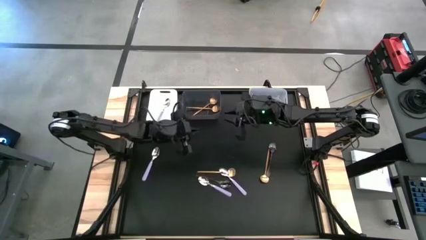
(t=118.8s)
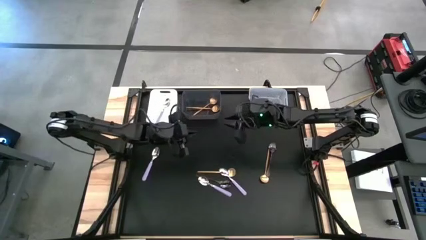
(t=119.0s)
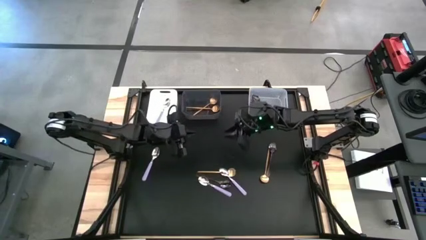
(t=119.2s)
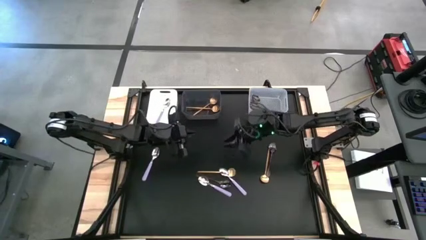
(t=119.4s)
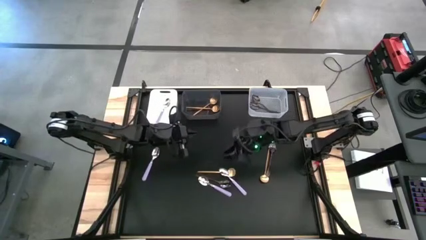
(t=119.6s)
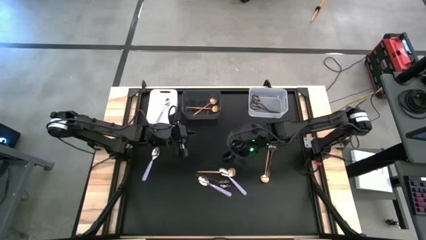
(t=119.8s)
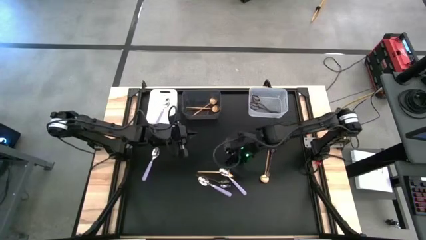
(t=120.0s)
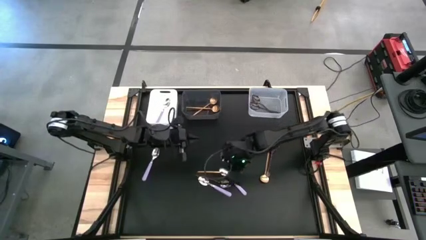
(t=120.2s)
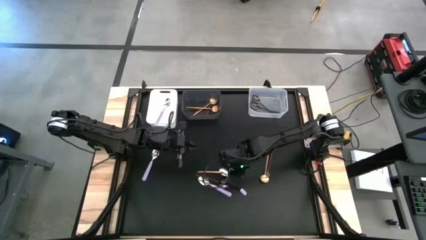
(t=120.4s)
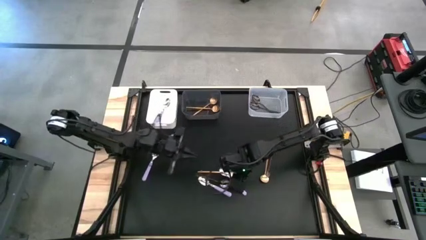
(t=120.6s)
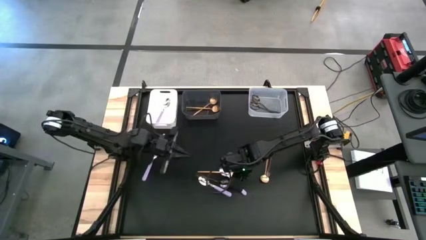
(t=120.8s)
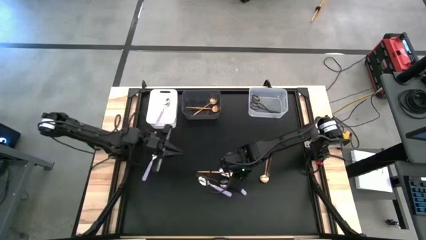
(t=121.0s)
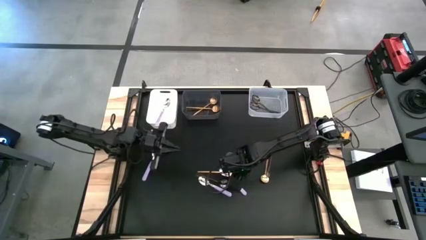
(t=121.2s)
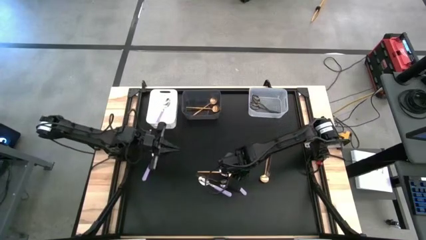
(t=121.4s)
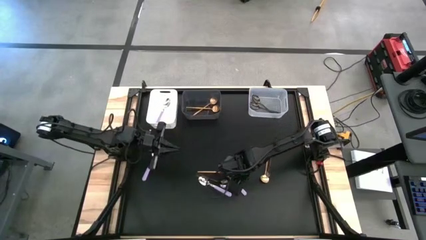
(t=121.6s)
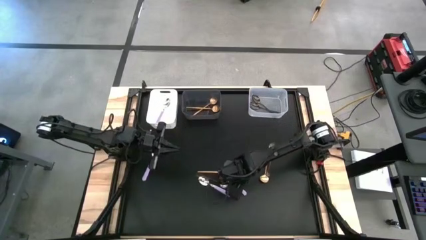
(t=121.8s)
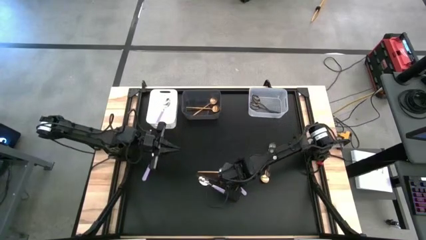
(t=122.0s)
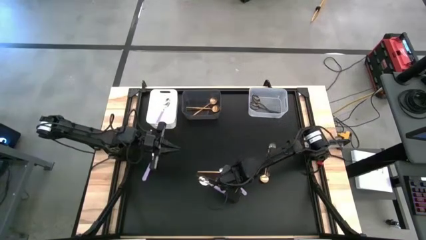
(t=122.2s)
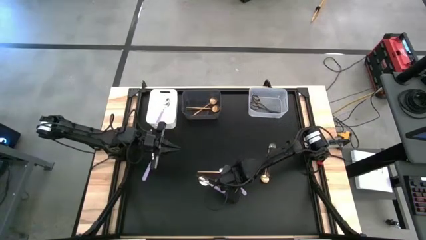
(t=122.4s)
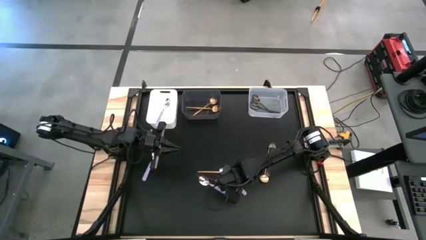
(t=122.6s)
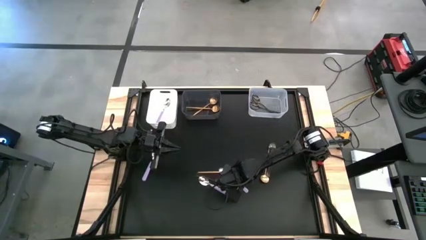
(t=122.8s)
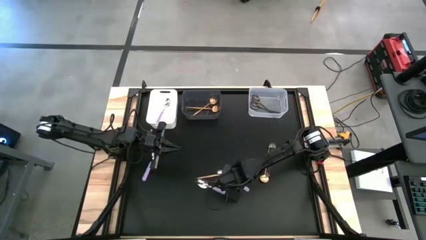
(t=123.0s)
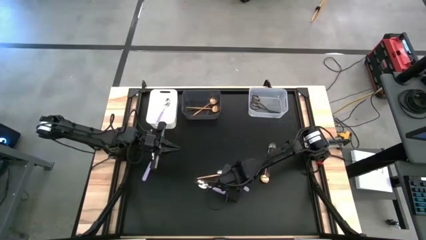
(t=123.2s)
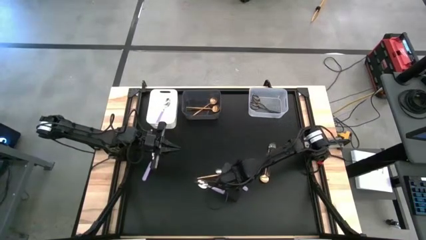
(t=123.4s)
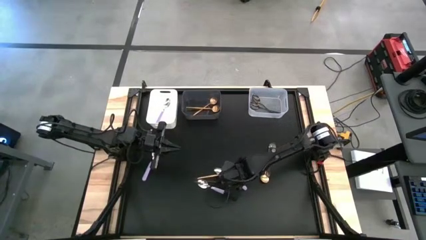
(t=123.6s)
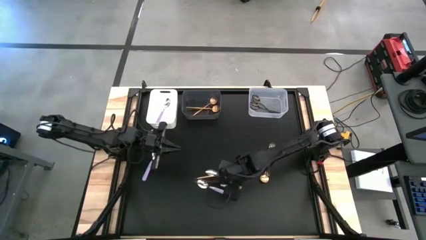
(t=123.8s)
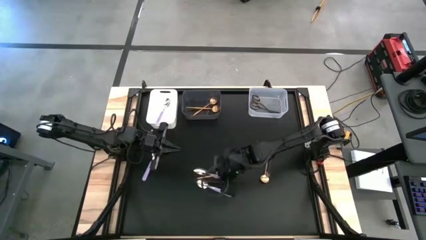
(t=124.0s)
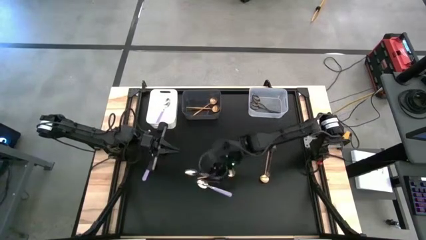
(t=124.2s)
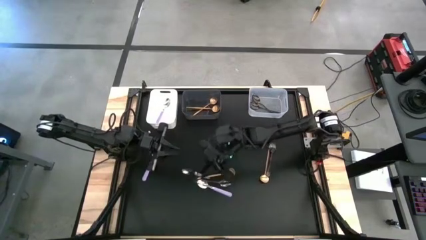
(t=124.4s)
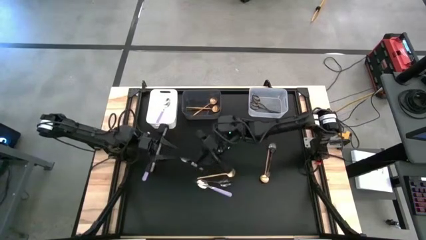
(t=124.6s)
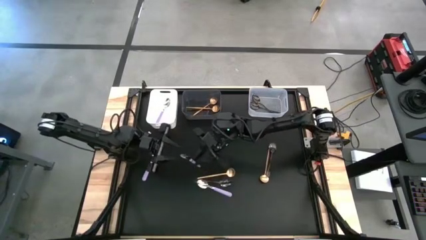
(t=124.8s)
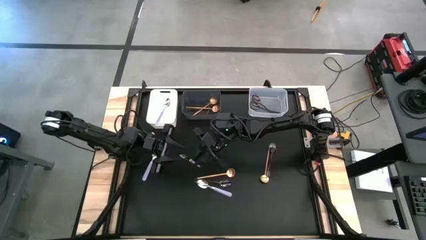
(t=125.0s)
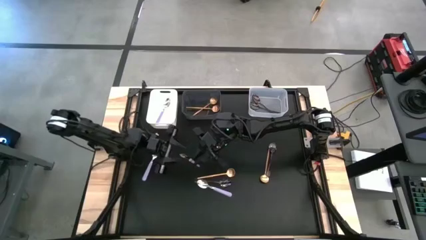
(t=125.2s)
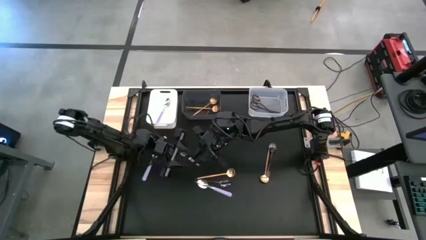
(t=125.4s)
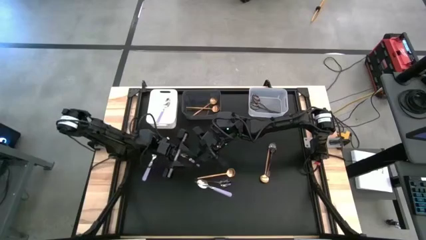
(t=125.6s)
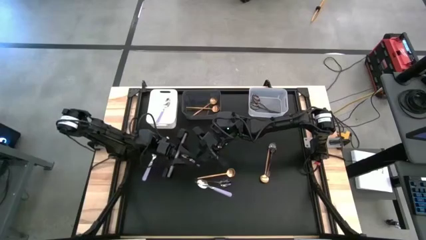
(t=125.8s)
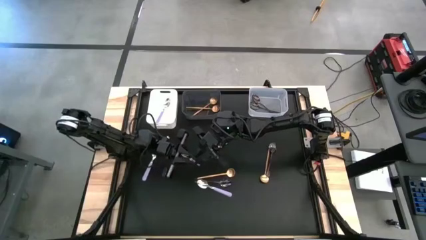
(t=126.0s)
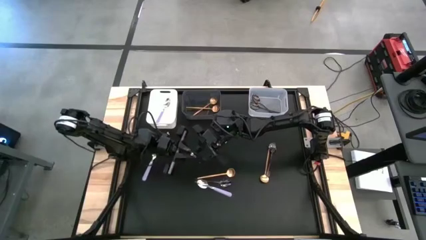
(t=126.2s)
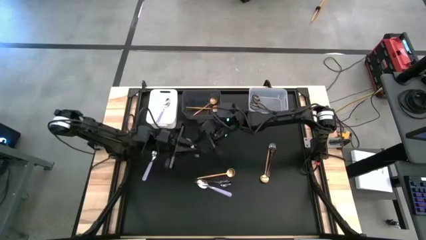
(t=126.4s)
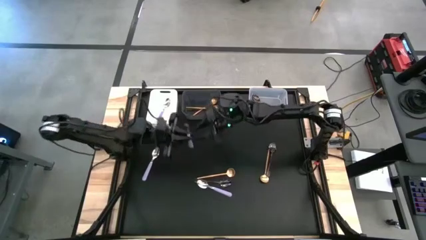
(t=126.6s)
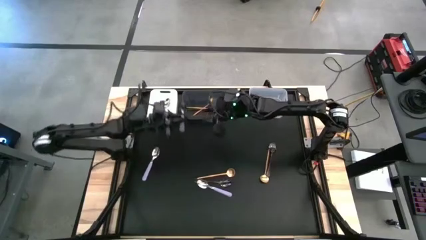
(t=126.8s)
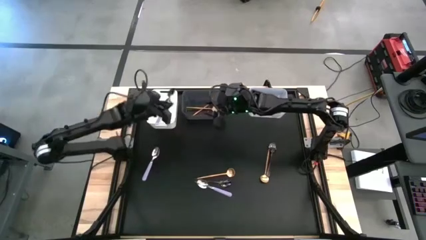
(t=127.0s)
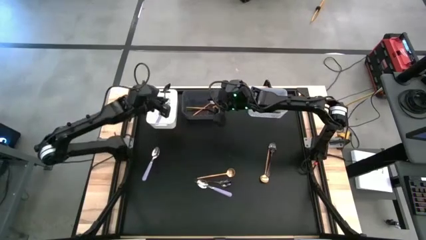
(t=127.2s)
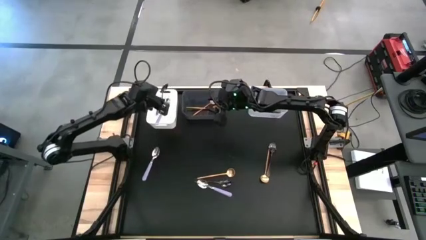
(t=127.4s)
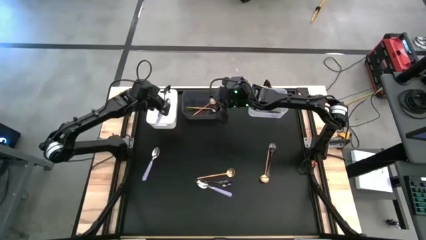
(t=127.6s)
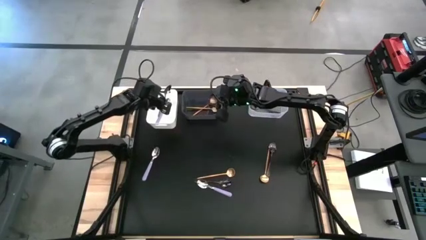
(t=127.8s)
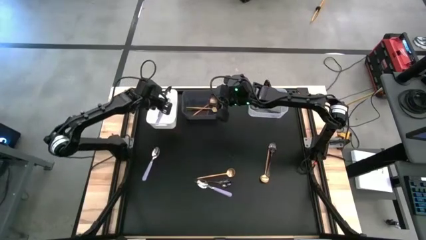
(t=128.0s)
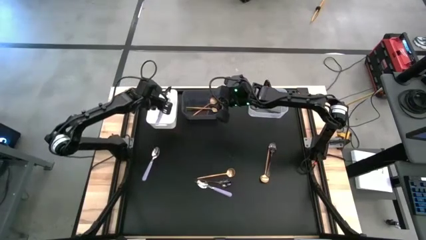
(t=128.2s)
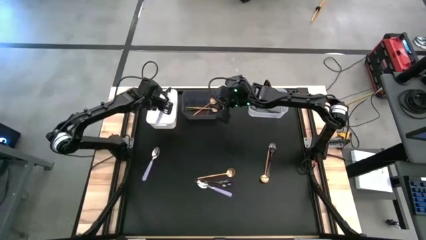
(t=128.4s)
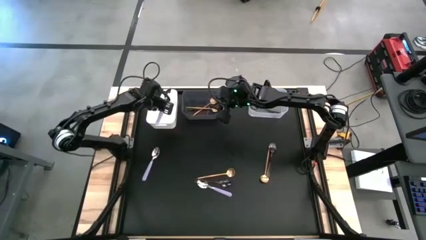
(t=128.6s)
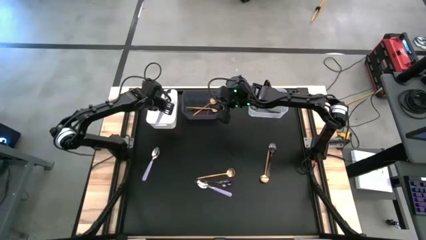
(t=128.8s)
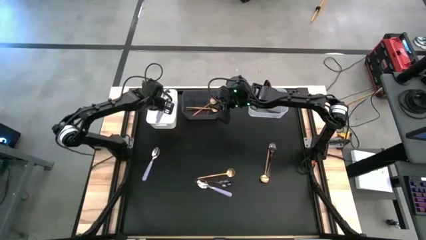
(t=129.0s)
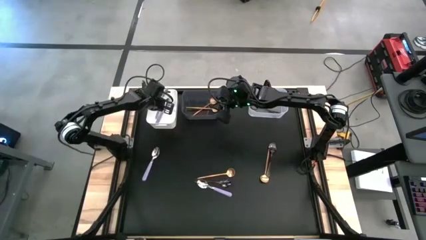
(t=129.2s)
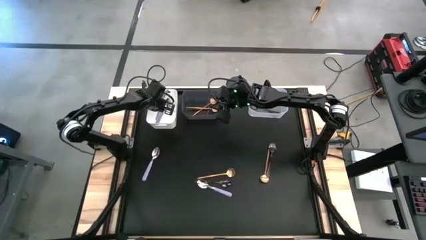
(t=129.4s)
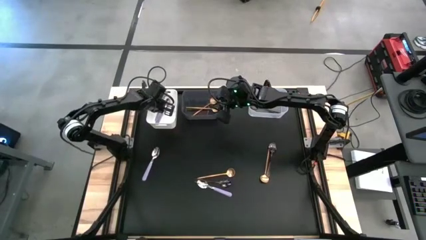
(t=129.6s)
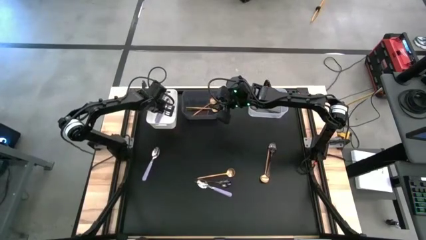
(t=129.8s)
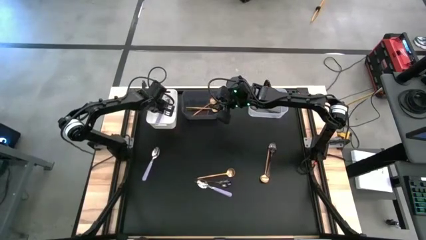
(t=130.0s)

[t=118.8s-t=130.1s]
Task: Sort silverware by color (type)
Put the purple spoon into the white bin
